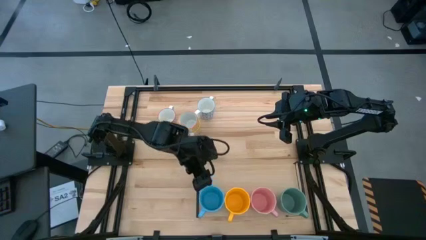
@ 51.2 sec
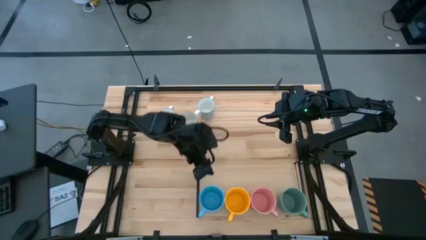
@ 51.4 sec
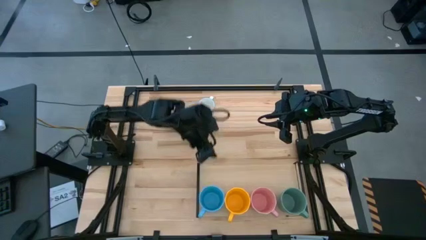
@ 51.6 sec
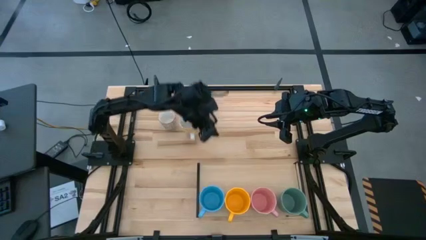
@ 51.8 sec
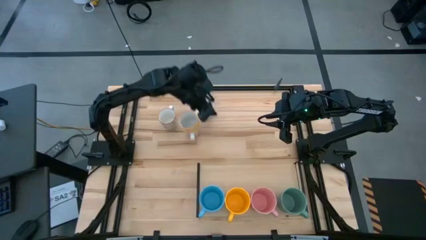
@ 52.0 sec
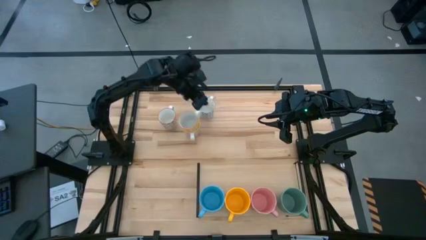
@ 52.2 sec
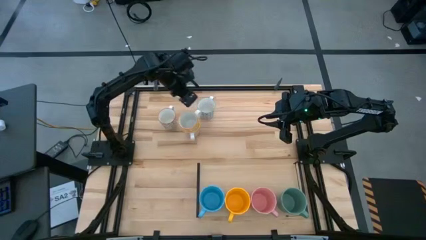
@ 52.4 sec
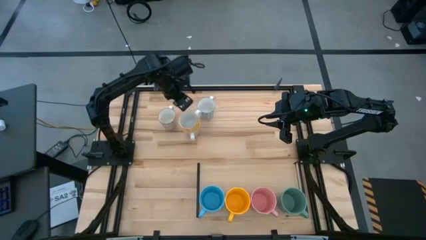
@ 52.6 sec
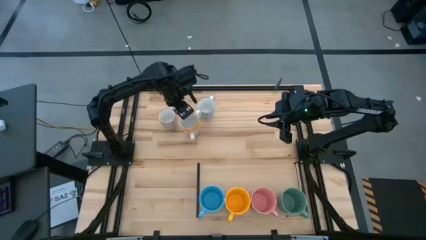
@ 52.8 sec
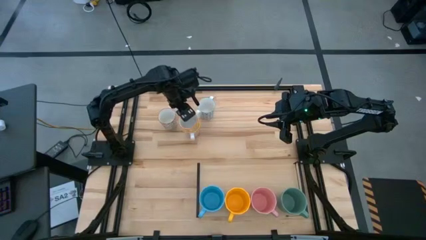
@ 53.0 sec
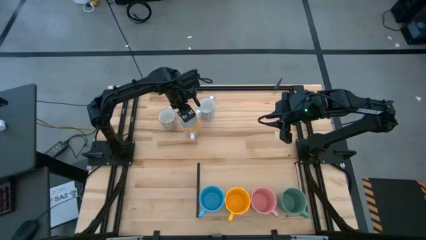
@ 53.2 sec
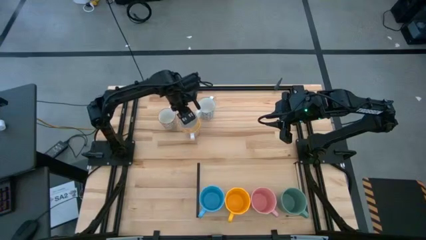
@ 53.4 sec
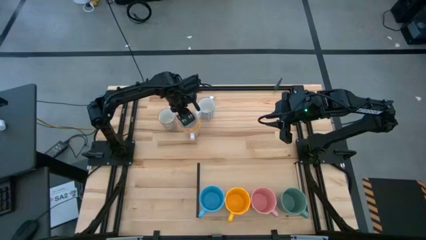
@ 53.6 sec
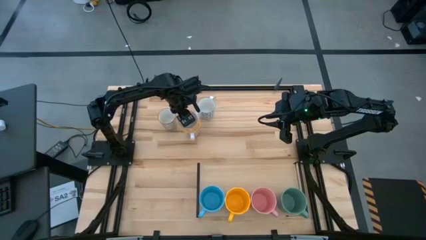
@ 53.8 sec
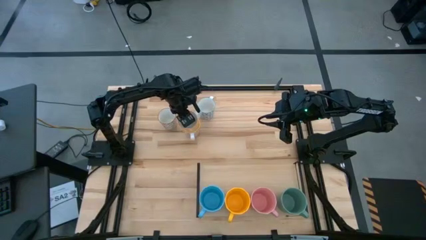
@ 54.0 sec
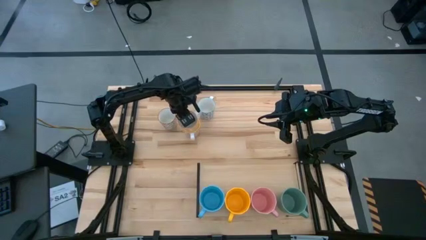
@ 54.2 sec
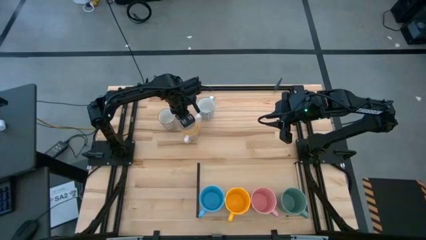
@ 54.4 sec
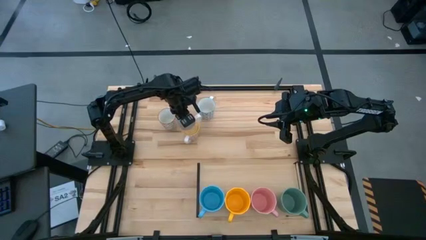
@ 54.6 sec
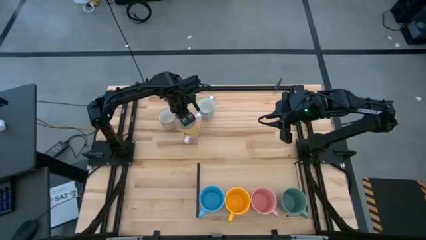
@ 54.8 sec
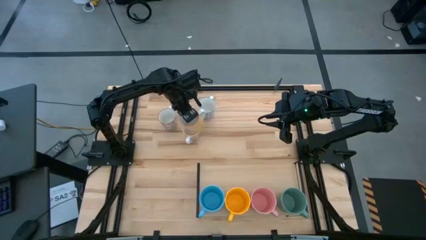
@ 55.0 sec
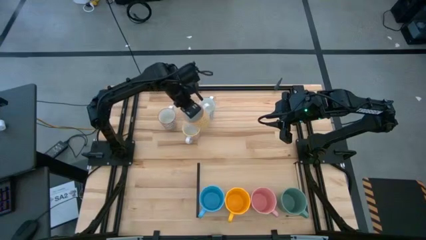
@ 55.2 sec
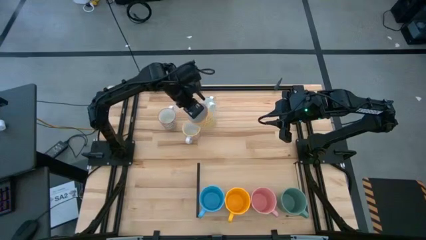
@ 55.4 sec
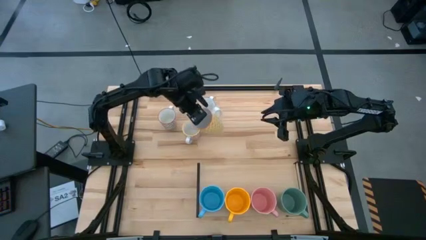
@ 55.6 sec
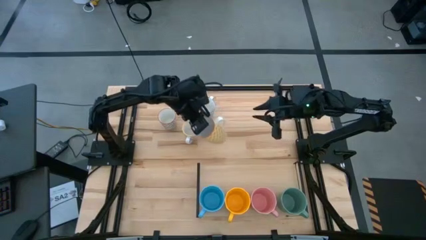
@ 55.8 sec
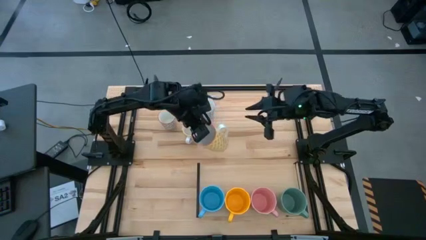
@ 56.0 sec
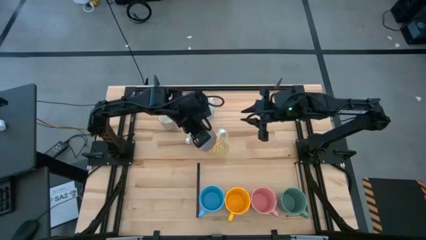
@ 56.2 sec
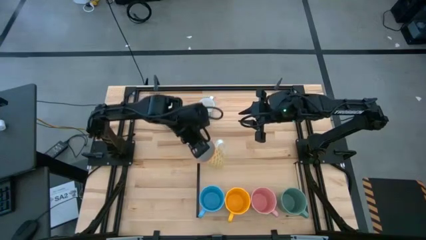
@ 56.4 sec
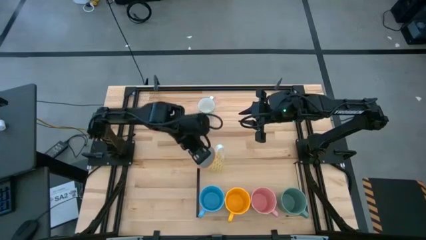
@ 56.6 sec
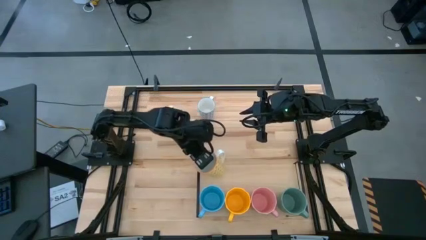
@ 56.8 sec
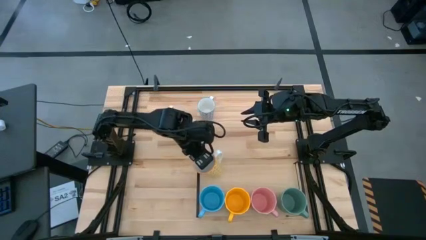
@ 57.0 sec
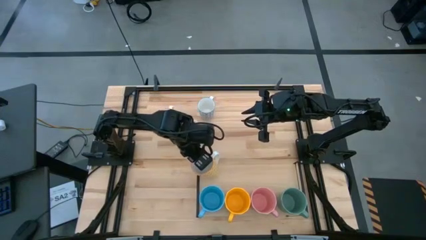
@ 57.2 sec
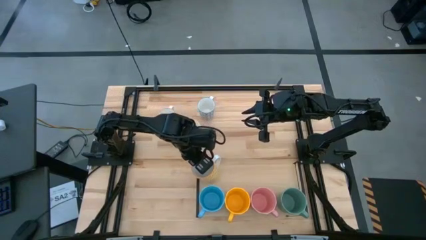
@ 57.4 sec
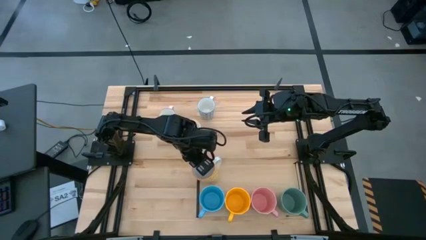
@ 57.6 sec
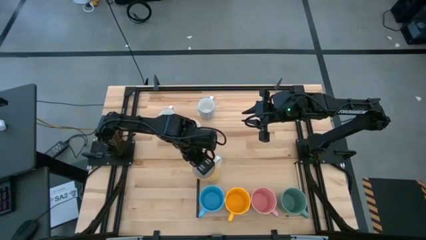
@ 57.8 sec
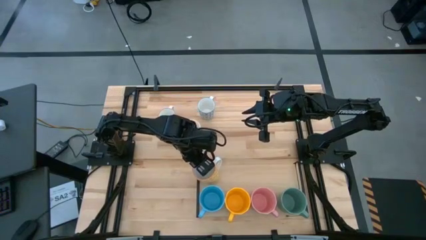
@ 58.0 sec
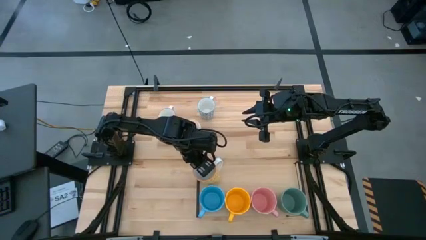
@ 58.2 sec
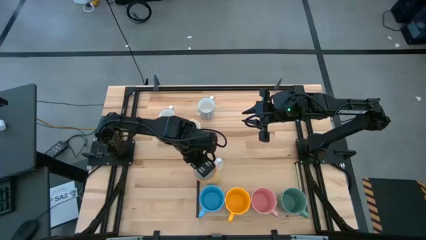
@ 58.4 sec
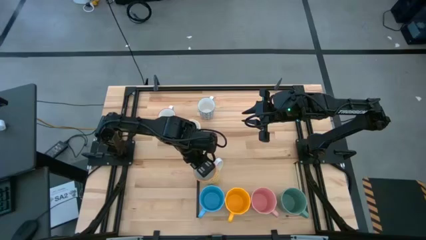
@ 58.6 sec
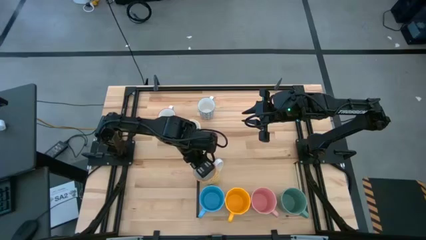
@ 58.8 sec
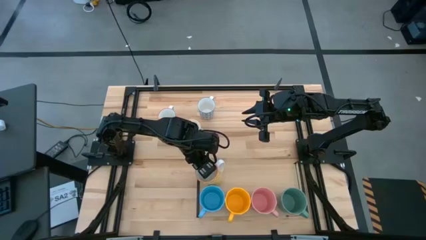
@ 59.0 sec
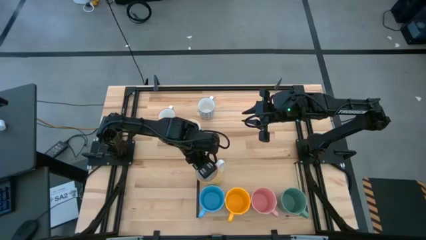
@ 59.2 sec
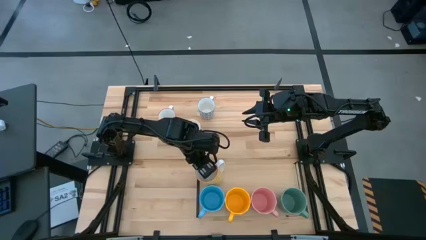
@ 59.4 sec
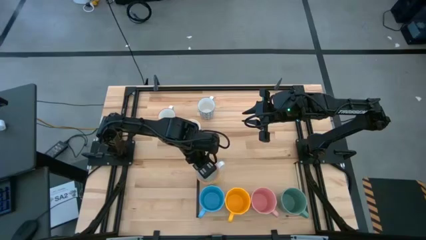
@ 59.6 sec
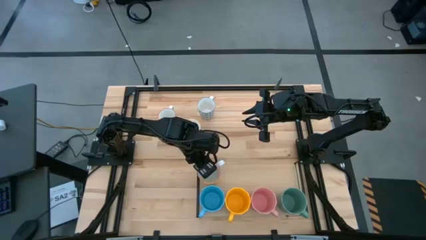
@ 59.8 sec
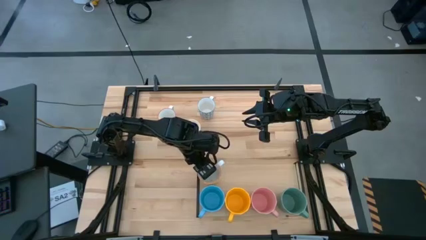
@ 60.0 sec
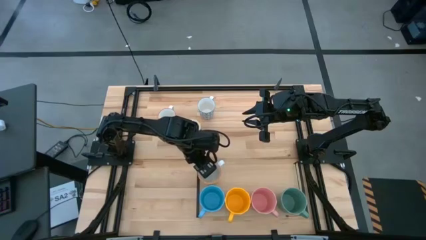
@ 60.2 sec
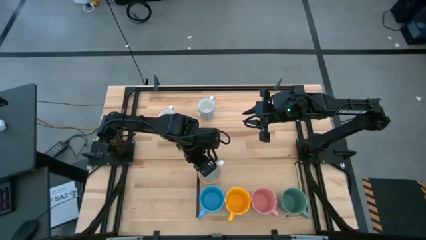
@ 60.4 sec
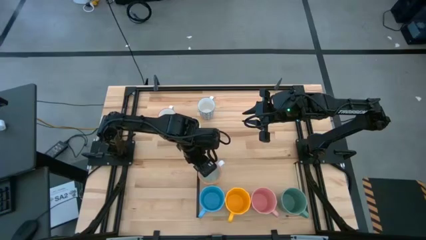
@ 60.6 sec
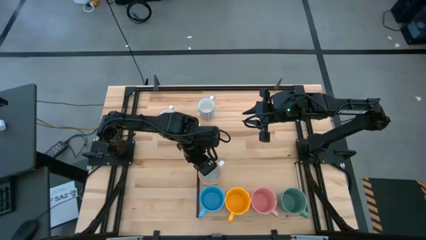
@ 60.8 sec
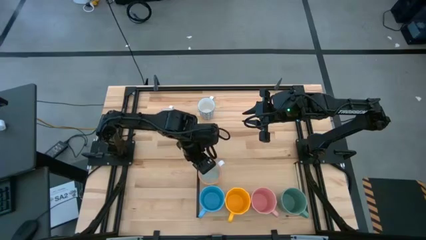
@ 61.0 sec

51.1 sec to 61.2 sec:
Task: Place coffee mugs
Put the yellow patterned mug on the shelf

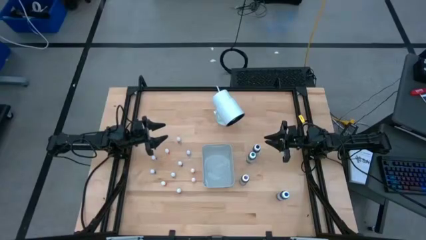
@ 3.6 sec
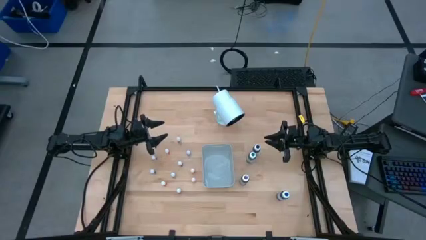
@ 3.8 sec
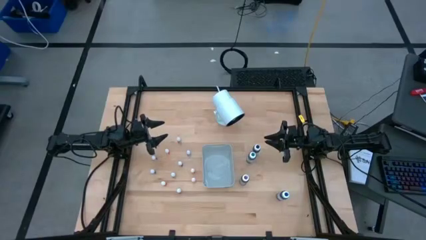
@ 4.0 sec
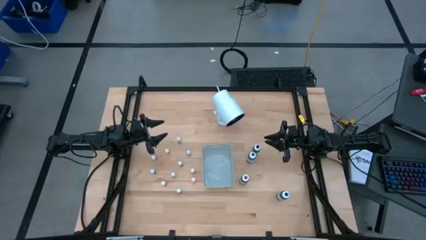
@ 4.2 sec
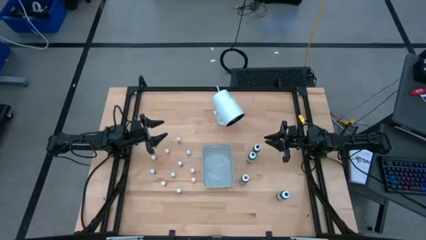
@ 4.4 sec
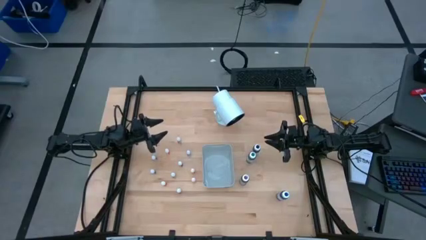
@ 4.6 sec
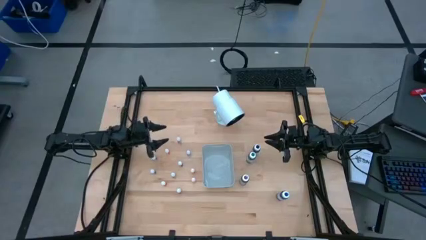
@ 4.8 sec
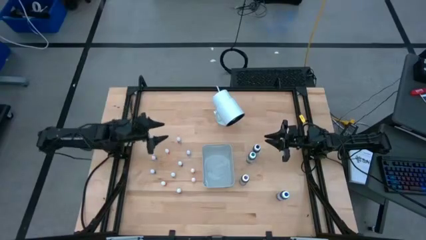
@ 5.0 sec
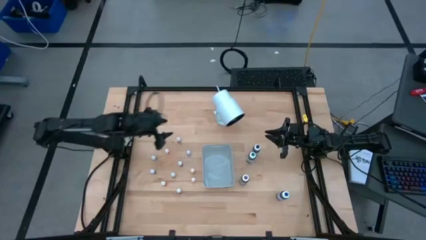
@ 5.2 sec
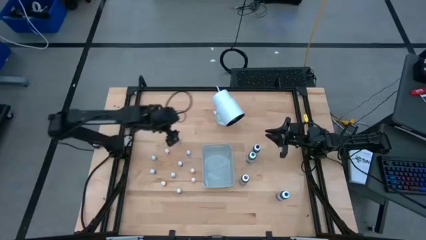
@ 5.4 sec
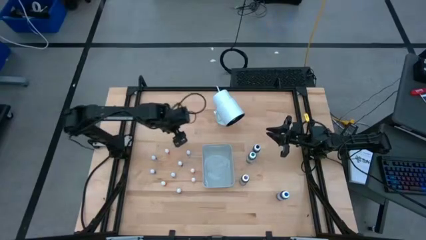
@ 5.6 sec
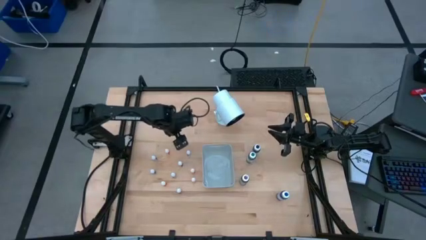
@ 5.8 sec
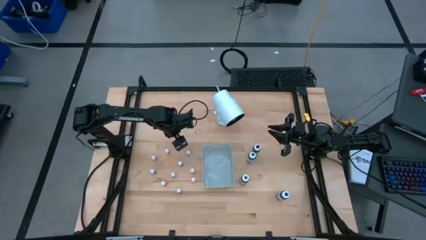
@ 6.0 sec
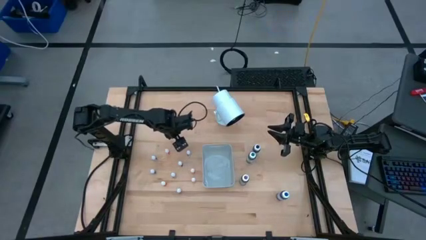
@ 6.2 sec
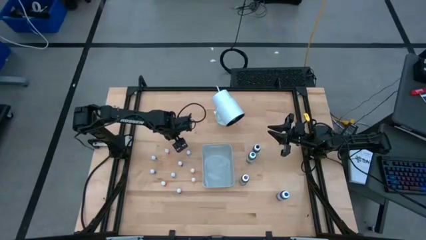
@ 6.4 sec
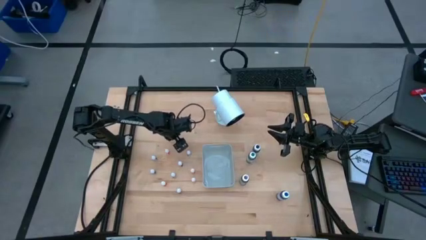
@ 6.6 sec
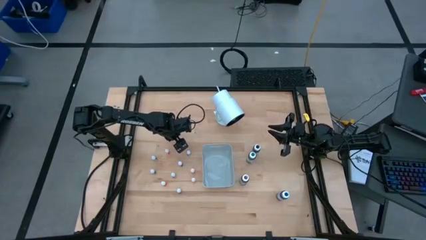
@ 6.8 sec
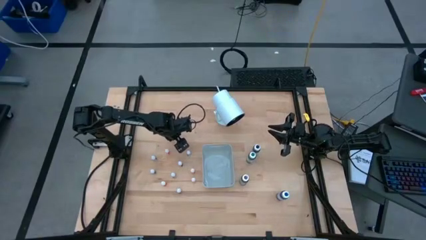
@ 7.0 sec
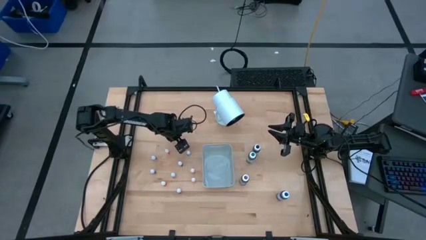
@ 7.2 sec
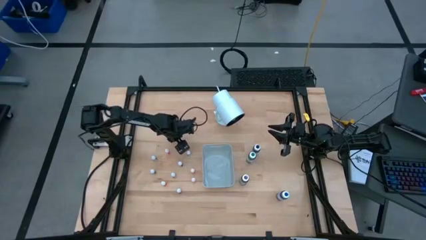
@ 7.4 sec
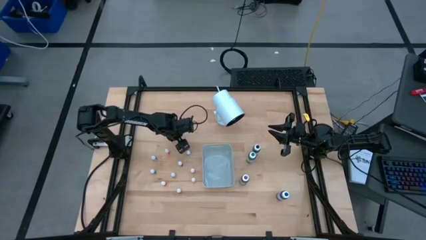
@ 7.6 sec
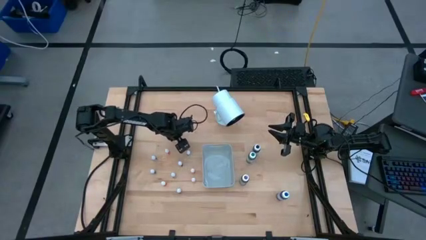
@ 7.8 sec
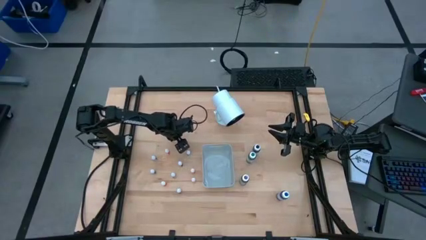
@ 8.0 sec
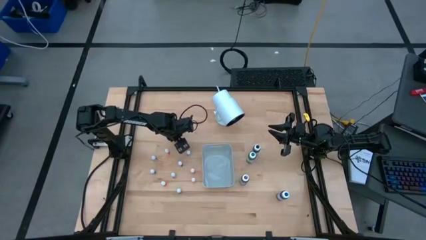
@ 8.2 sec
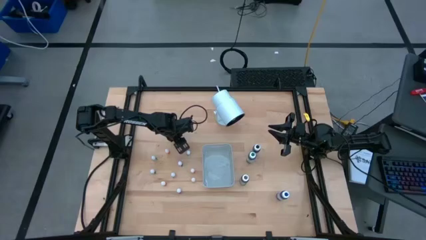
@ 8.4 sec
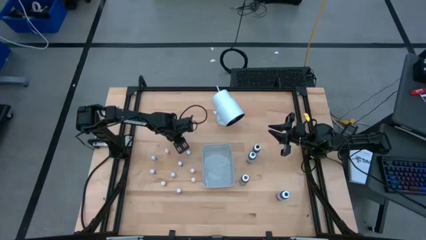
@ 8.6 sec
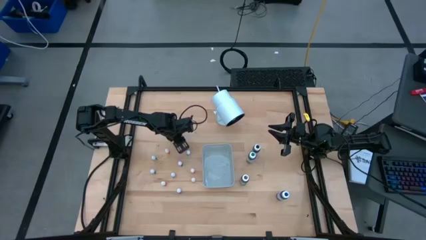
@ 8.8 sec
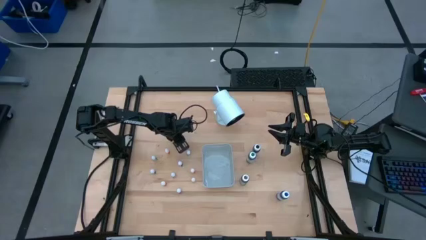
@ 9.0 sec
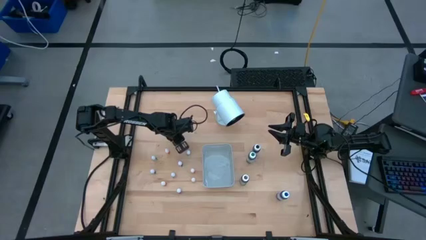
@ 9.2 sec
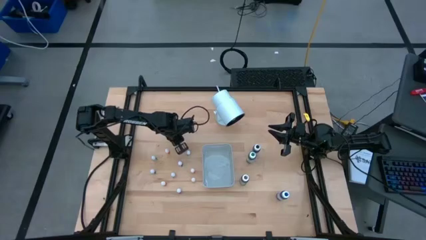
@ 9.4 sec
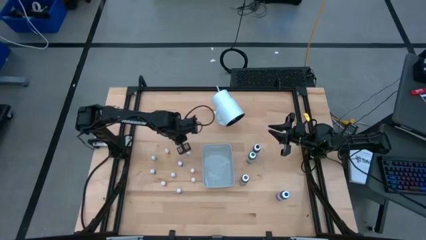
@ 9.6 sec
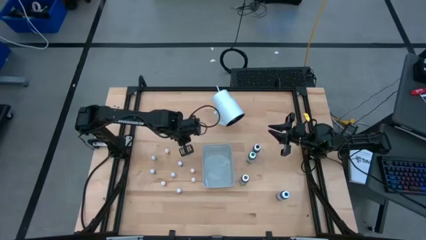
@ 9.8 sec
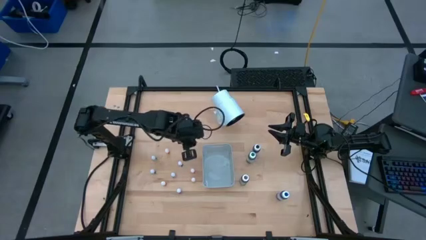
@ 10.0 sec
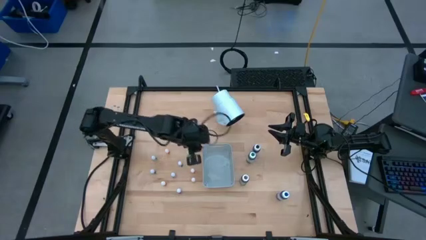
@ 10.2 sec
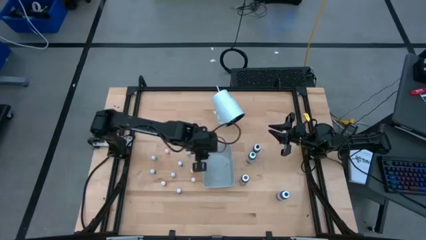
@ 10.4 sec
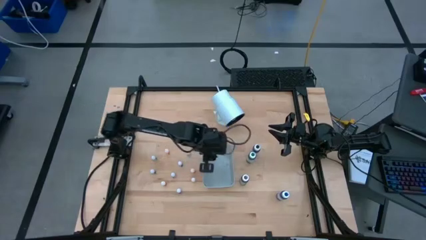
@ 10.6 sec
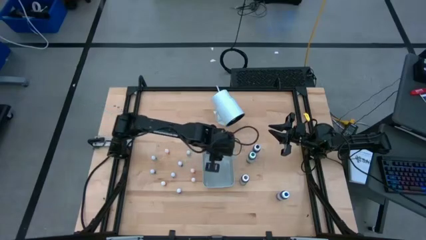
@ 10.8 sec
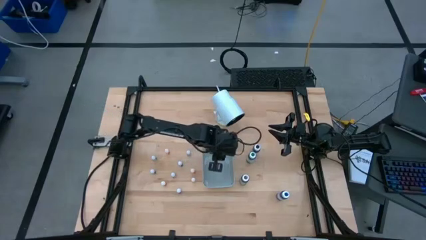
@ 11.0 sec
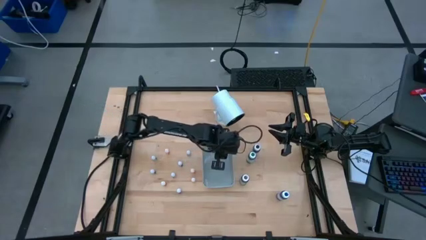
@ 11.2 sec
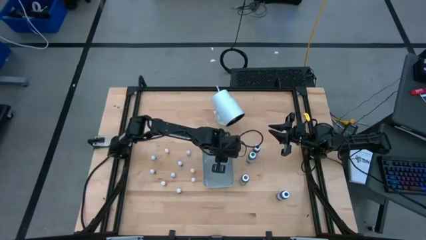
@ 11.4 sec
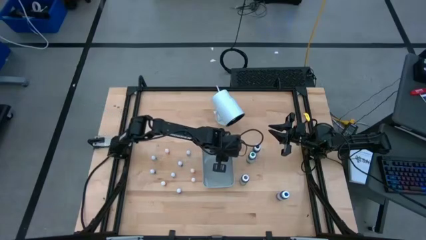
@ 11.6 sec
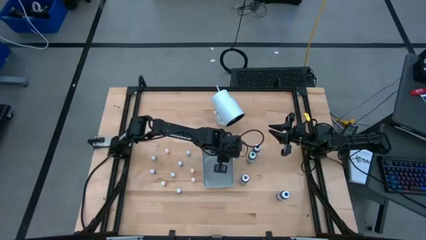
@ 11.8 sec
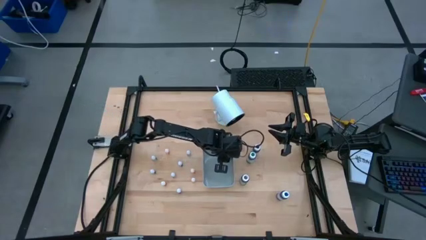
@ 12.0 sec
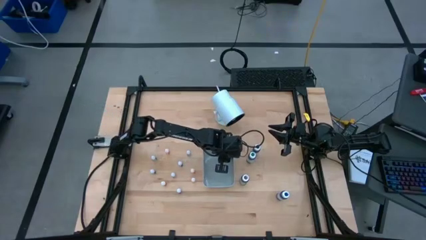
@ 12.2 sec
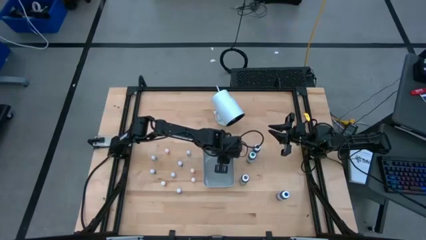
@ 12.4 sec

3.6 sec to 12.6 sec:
Task: Pick & Place food coloring
Put the top small violet food coloring bottle into the gray bin
